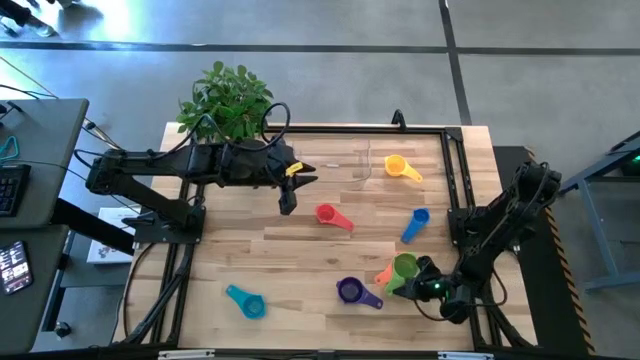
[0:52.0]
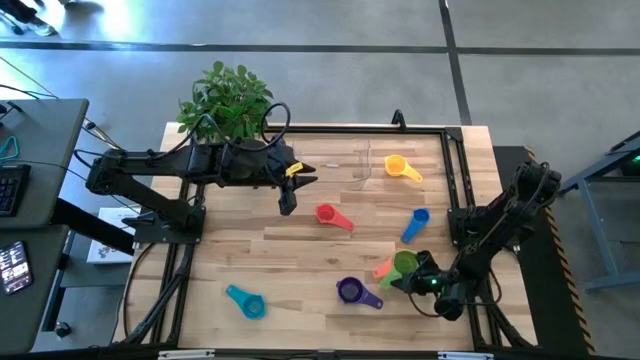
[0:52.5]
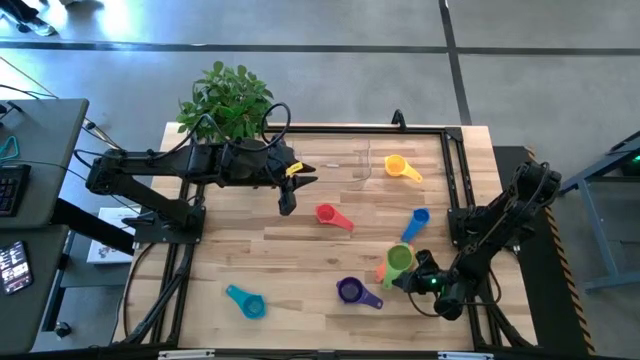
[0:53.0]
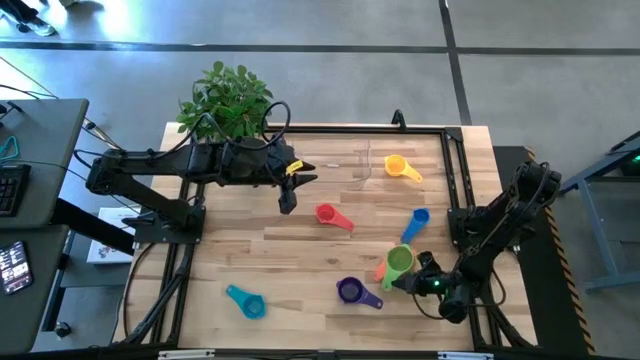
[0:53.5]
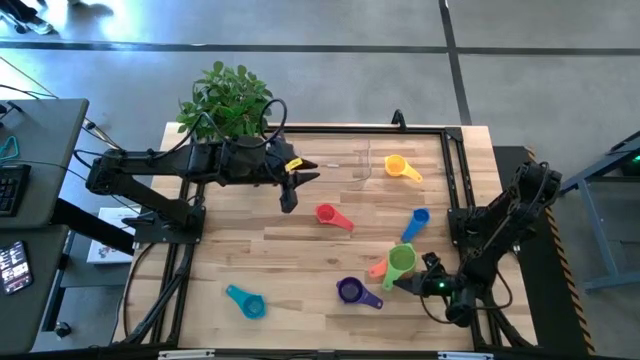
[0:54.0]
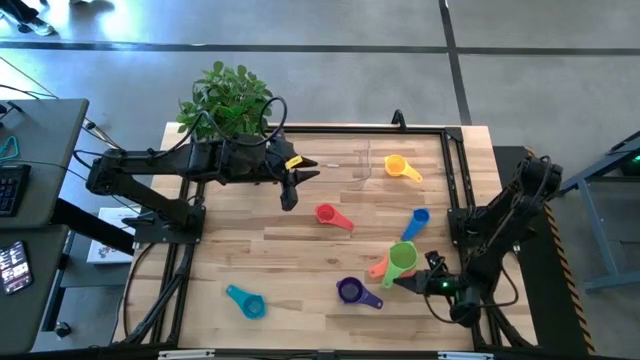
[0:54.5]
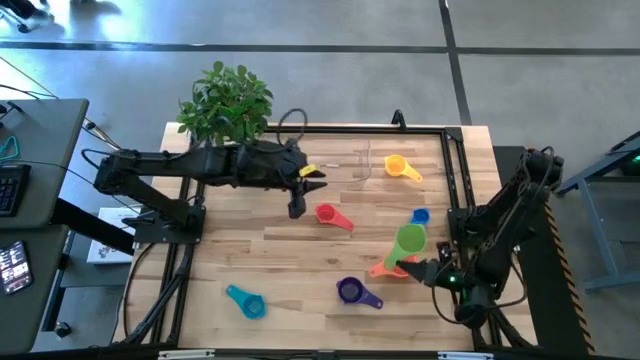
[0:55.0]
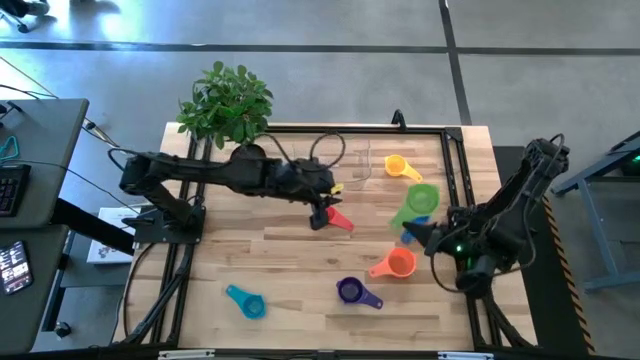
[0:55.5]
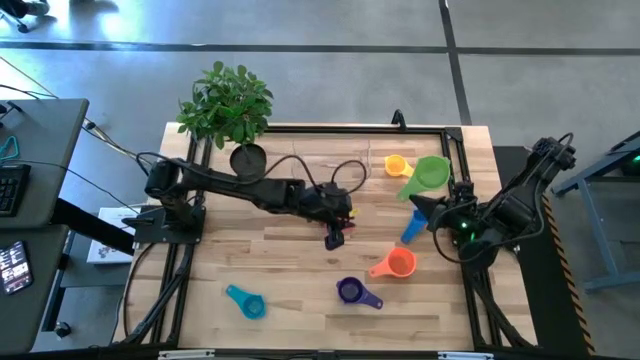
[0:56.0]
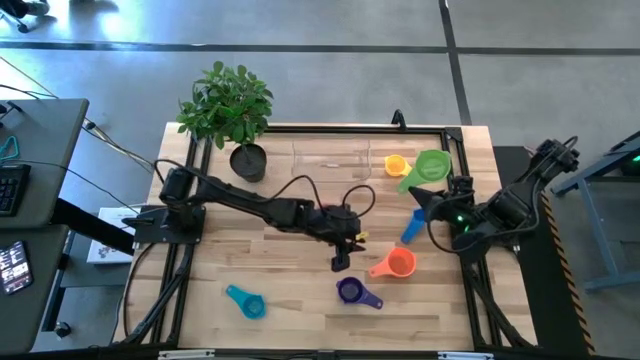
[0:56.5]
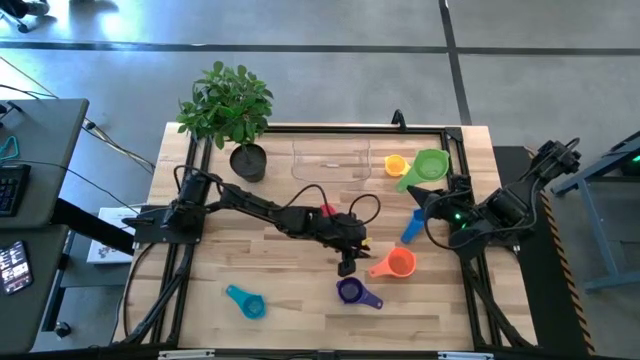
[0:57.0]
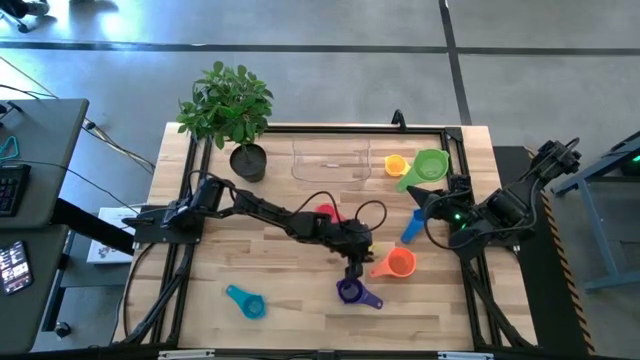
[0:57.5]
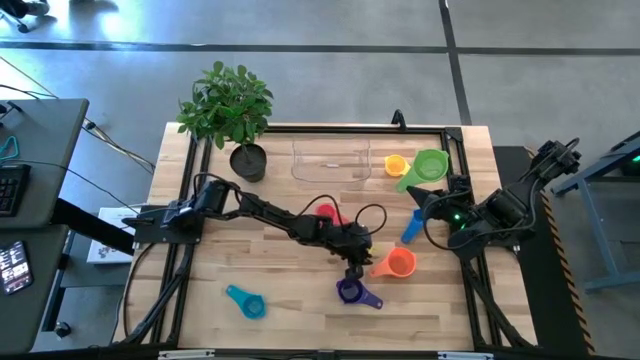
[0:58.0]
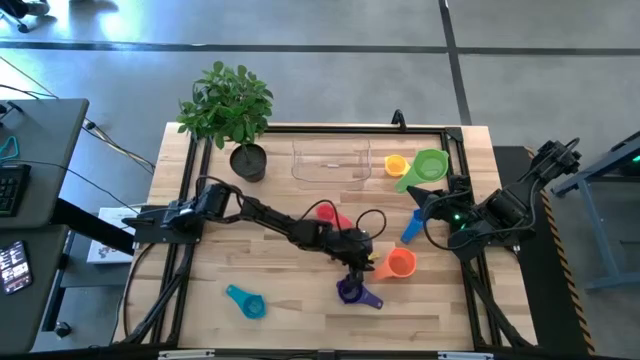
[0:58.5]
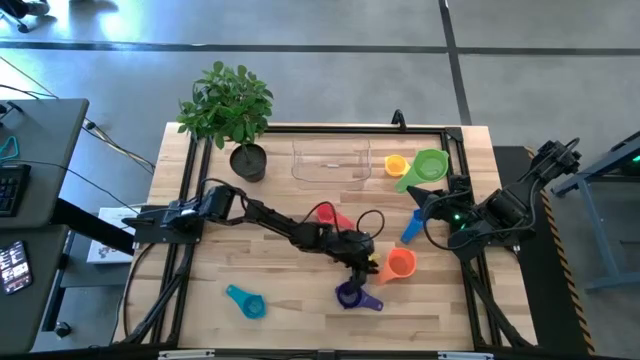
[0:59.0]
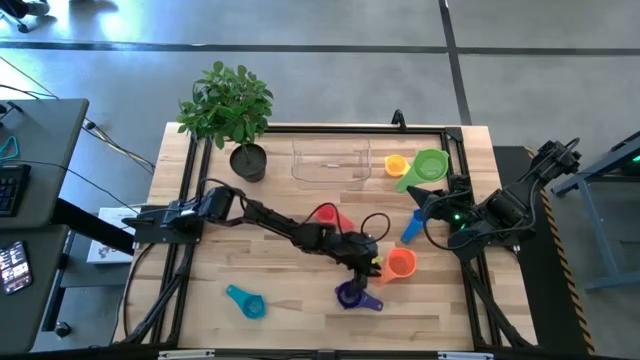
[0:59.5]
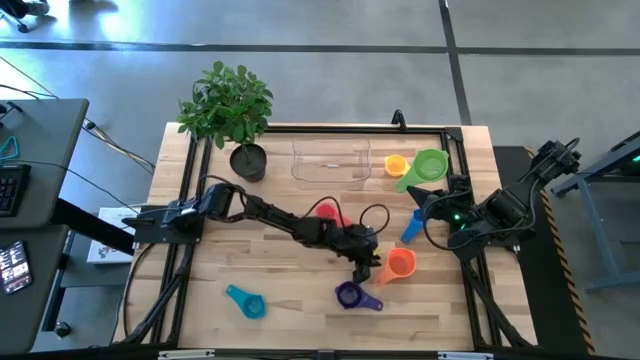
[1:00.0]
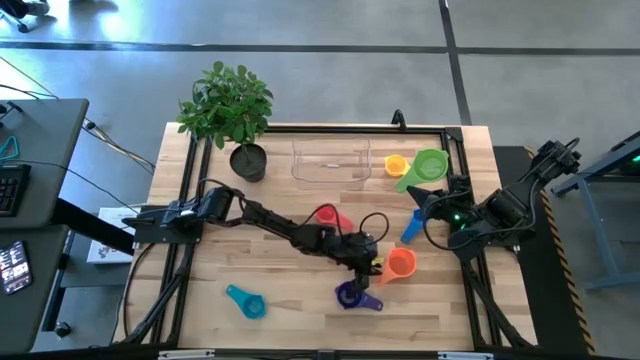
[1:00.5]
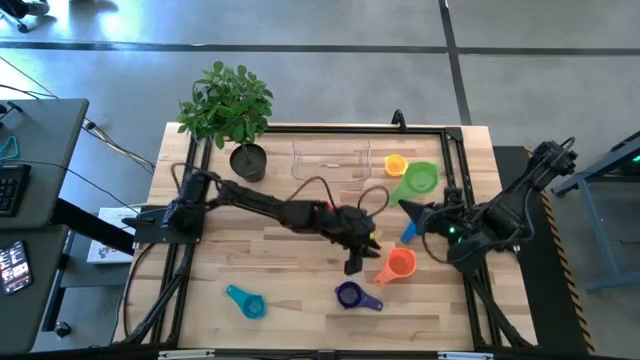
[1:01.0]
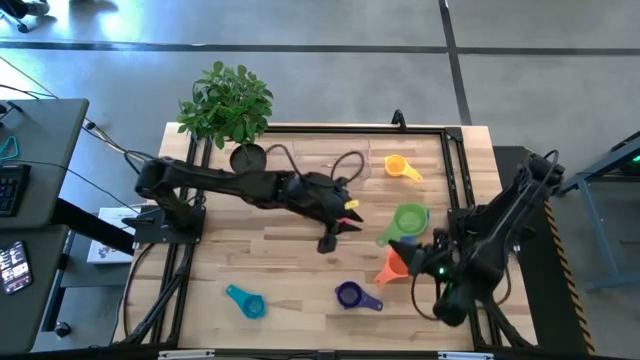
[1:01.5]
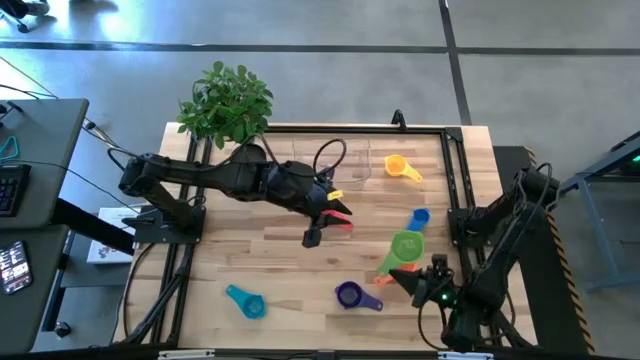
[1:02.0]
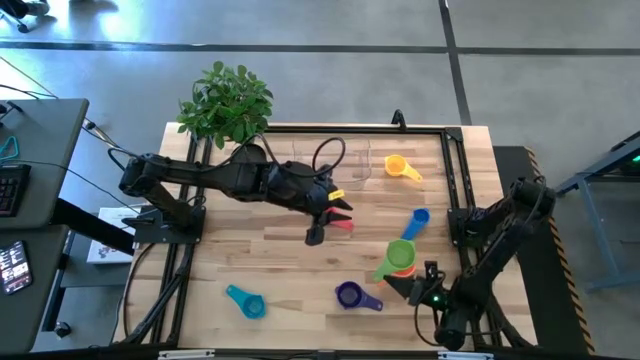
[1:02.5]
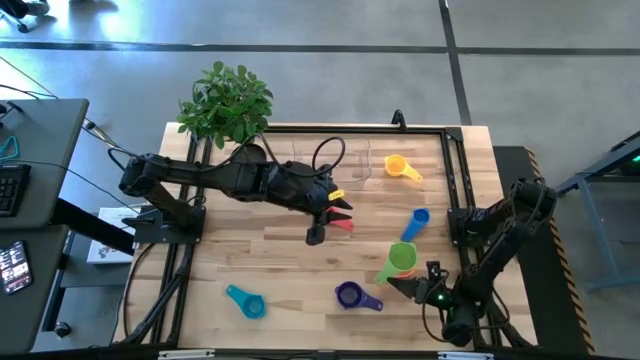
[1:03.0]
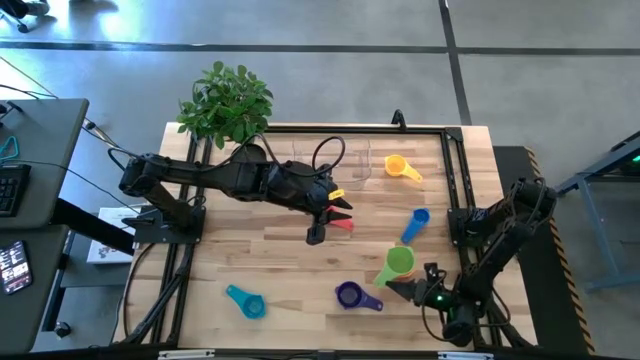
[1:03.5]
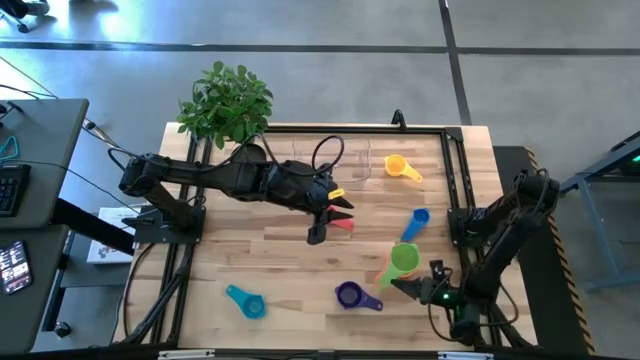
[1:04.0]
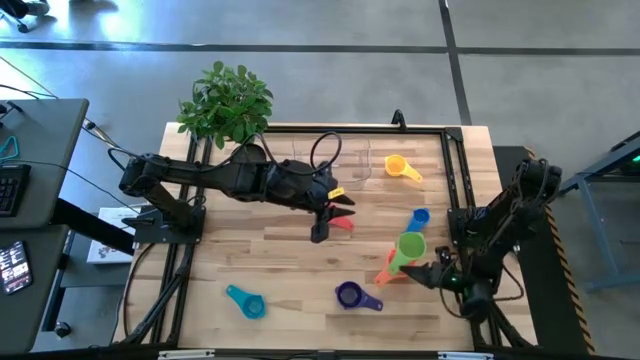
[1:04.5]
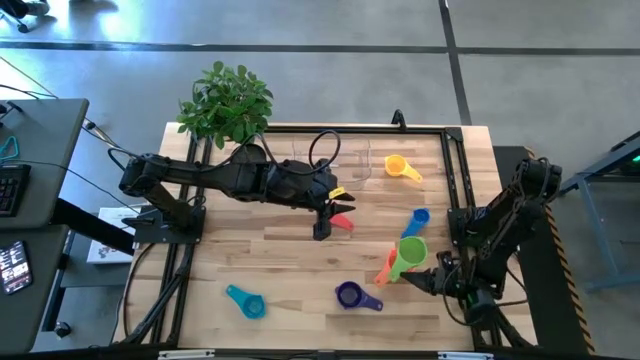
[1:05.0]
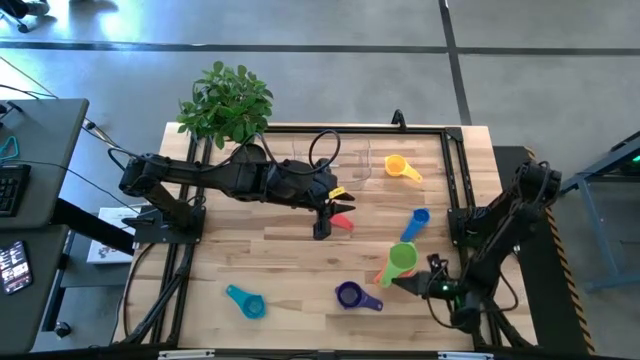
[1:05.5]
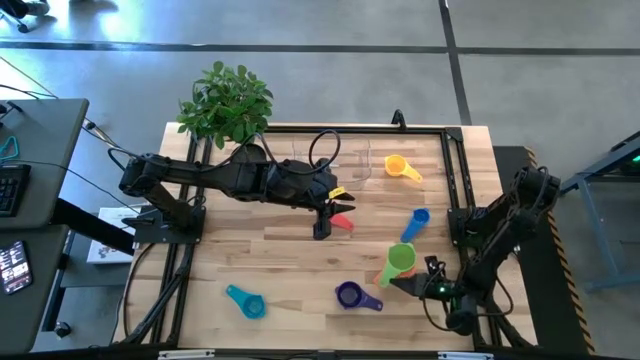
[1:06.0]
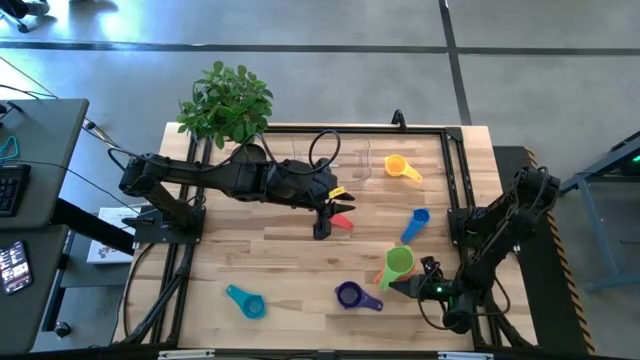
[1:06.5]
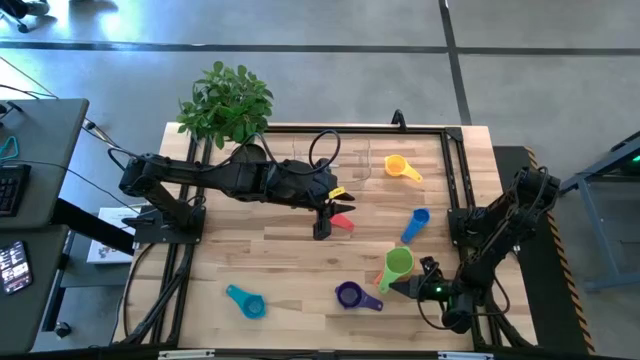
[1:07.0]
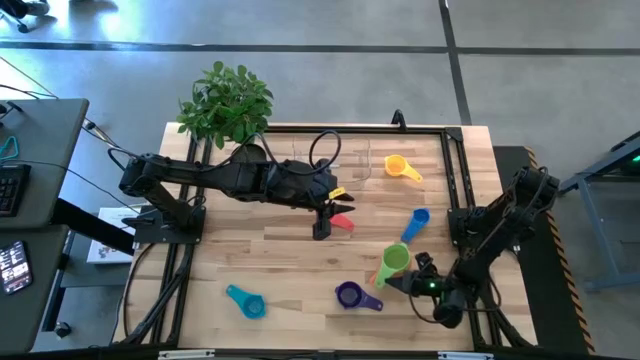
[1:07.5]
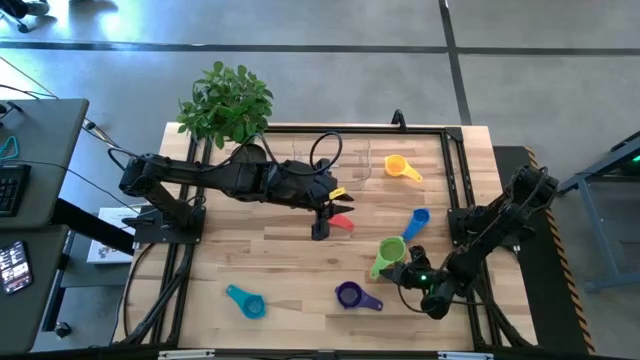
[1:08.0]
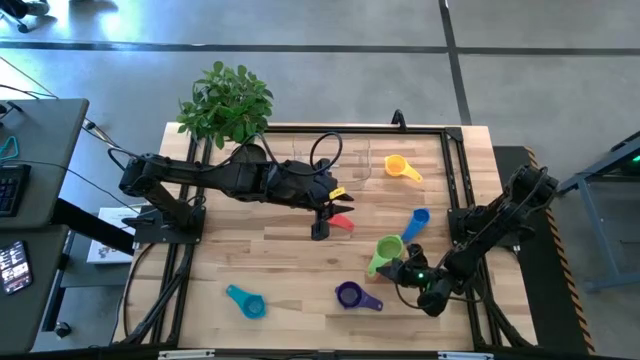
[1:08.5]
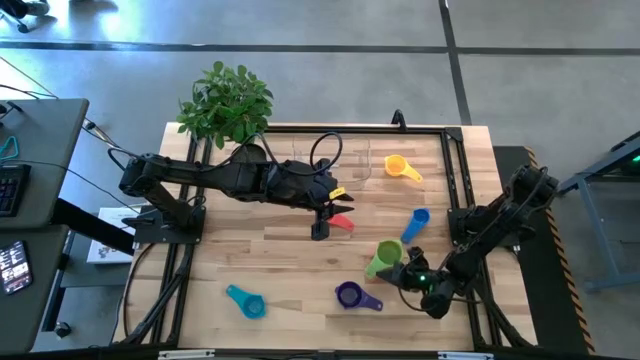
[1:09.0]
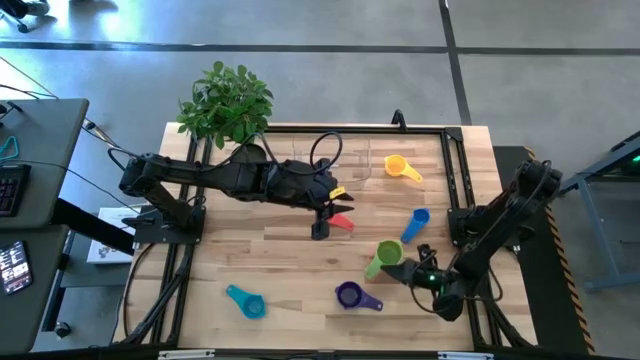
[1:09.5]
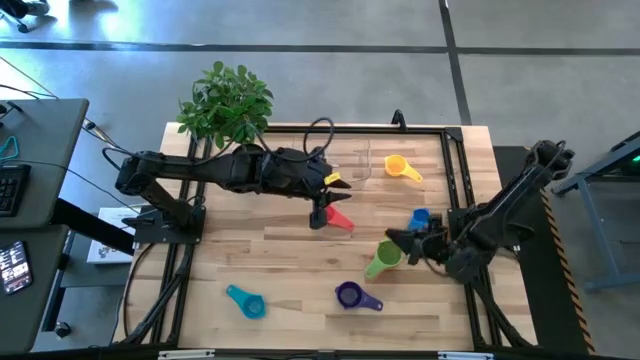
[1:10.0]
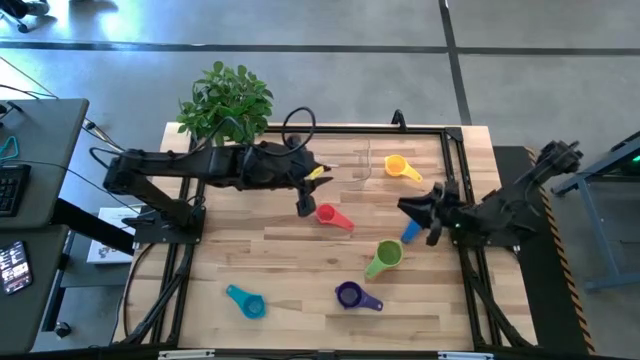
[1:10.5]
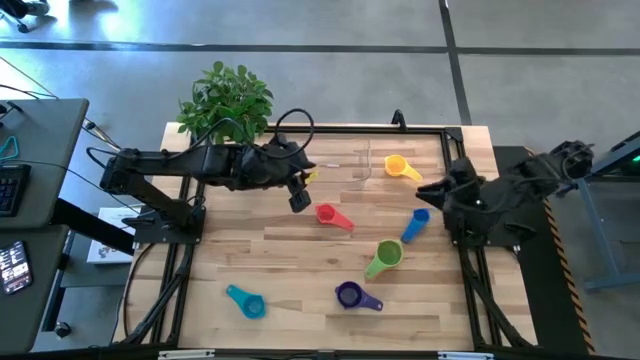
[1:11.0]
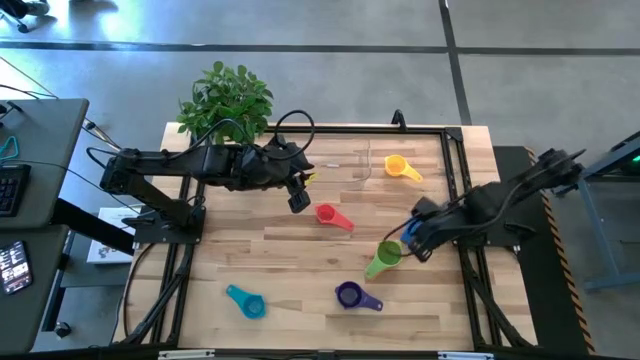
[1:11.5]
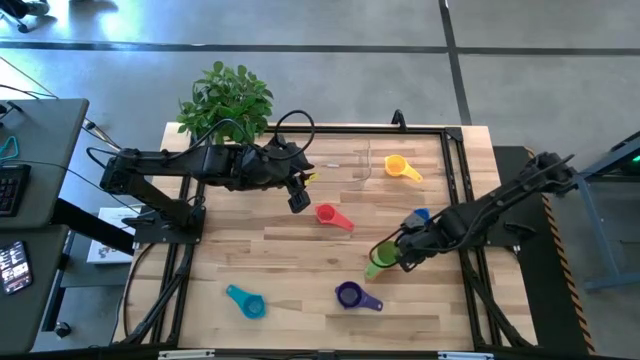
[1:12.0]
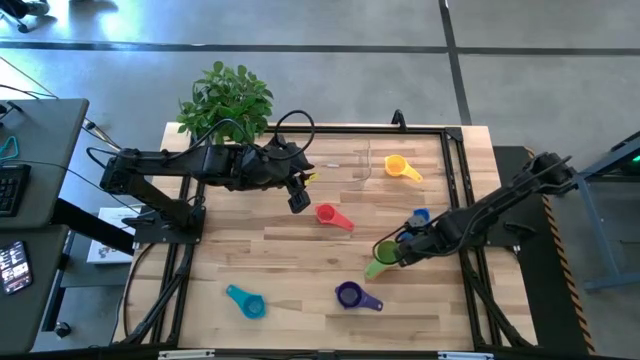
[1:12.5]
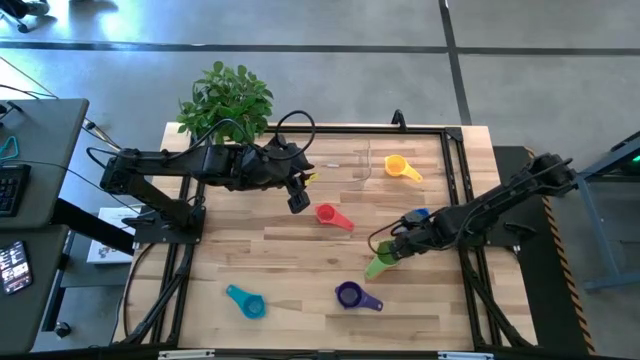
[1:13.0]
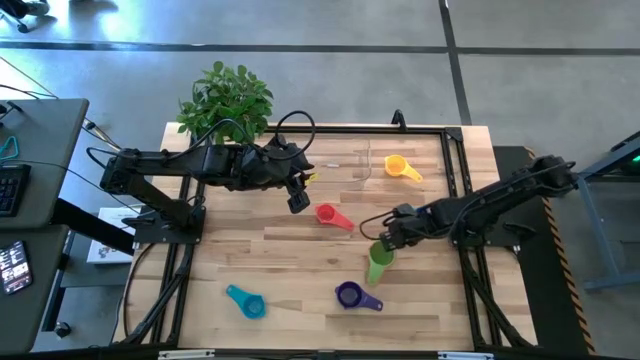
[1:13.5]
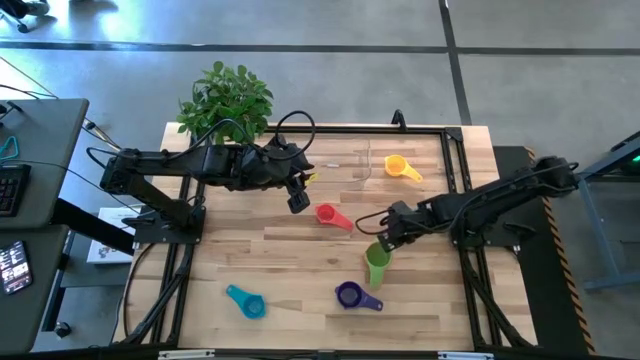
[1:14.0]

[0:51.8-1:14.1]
Task: Nest measuring cups in basket
Stack the green measuring cup on top of the orange measuring cup
